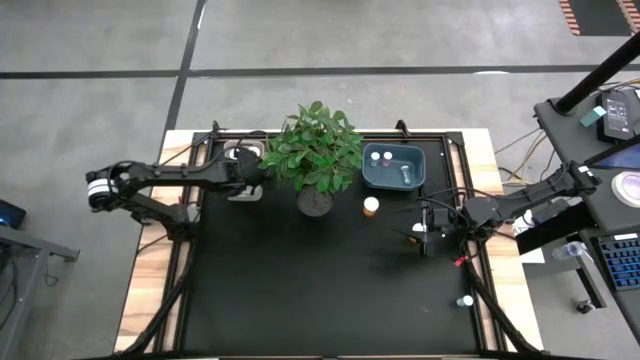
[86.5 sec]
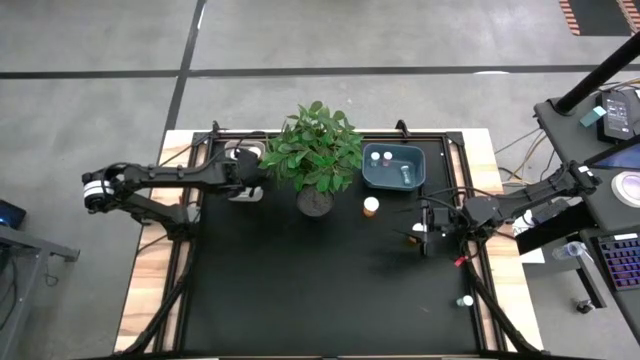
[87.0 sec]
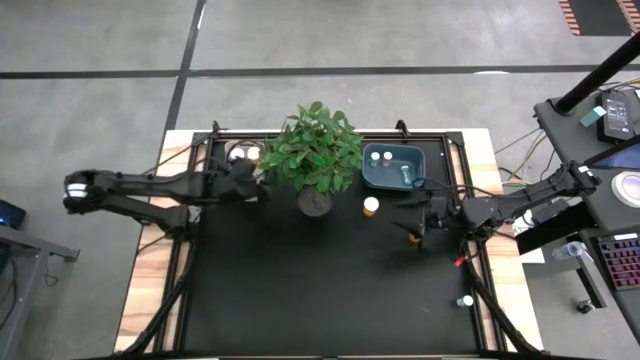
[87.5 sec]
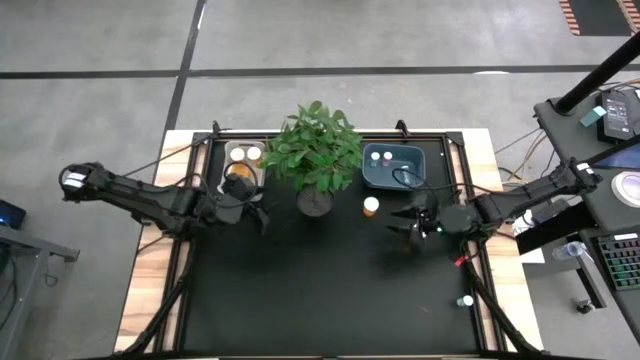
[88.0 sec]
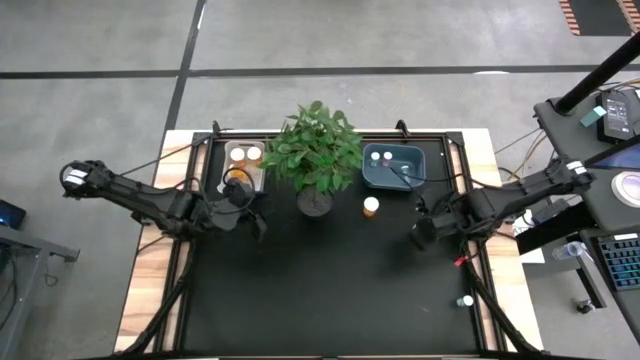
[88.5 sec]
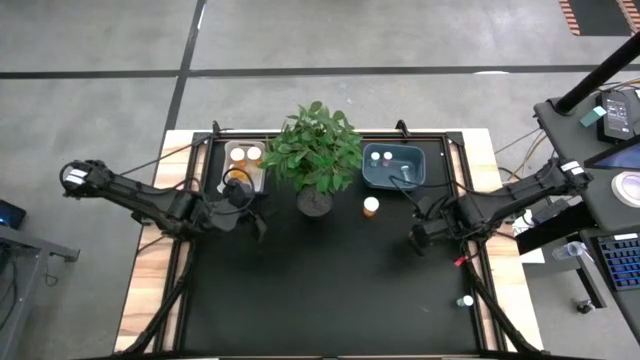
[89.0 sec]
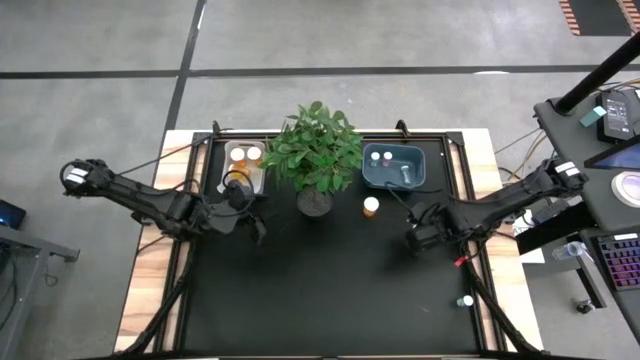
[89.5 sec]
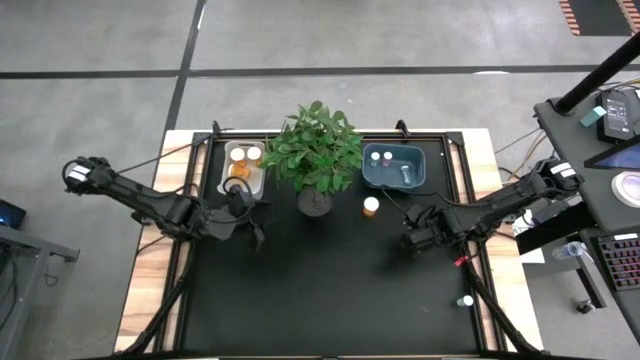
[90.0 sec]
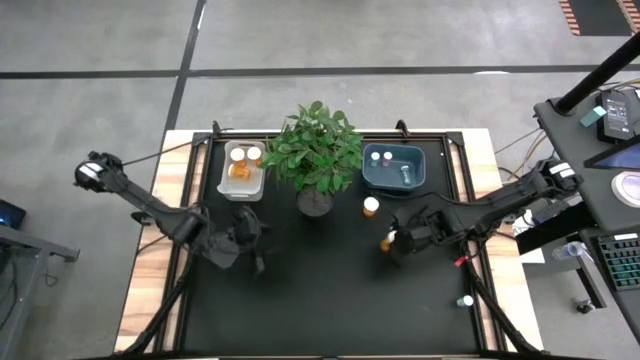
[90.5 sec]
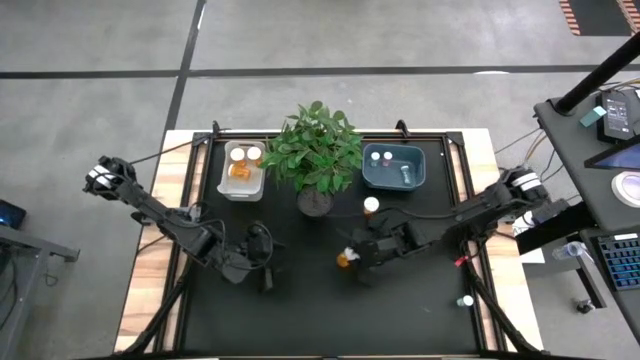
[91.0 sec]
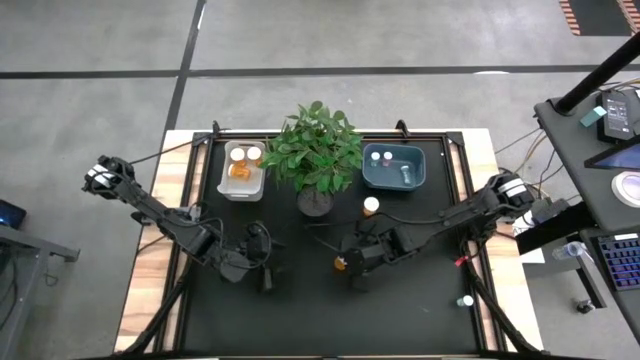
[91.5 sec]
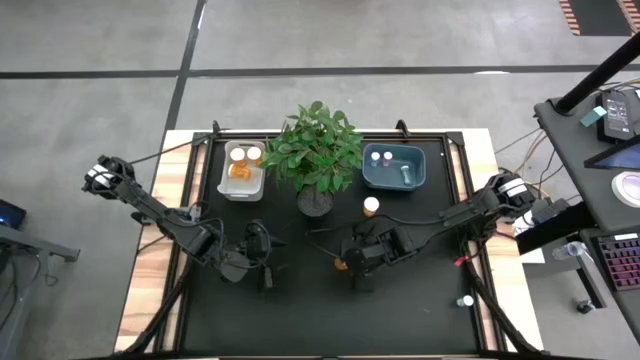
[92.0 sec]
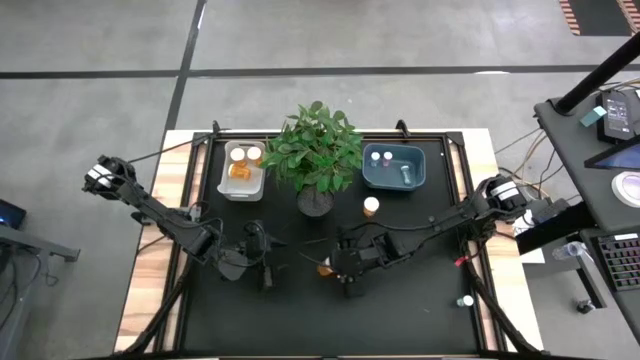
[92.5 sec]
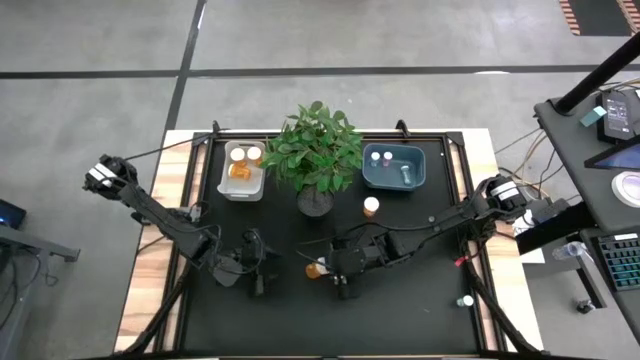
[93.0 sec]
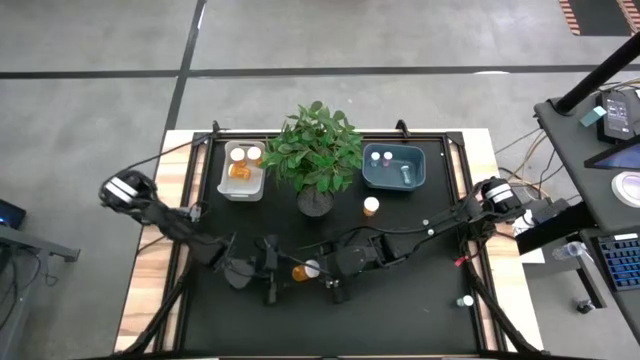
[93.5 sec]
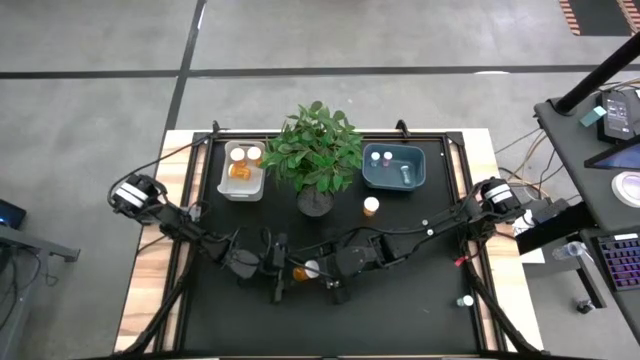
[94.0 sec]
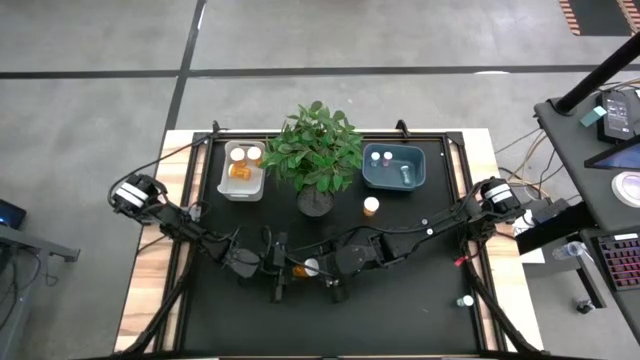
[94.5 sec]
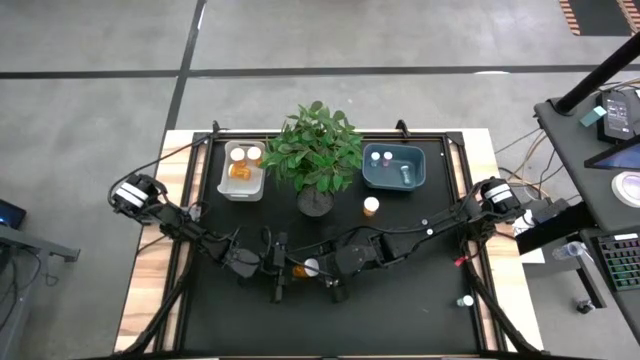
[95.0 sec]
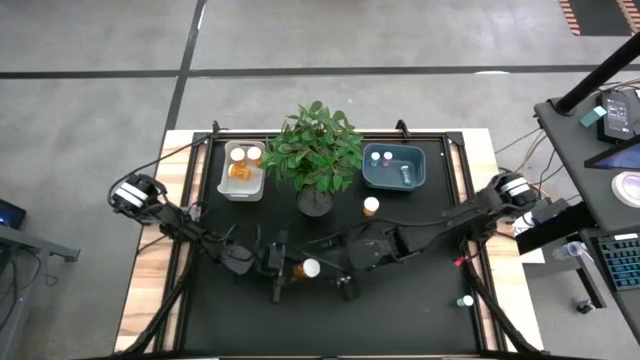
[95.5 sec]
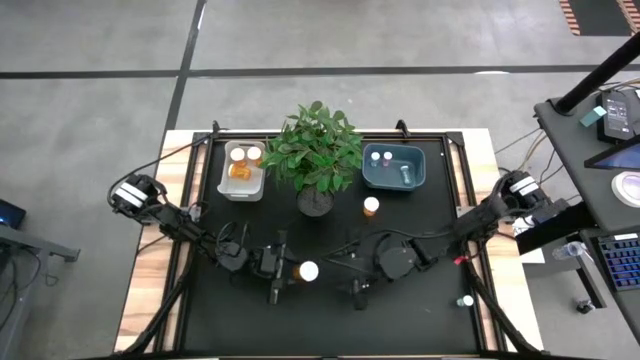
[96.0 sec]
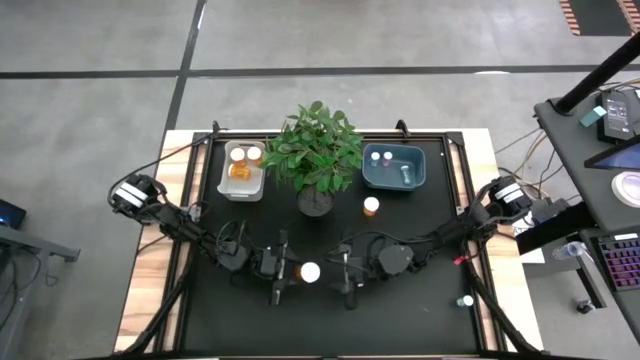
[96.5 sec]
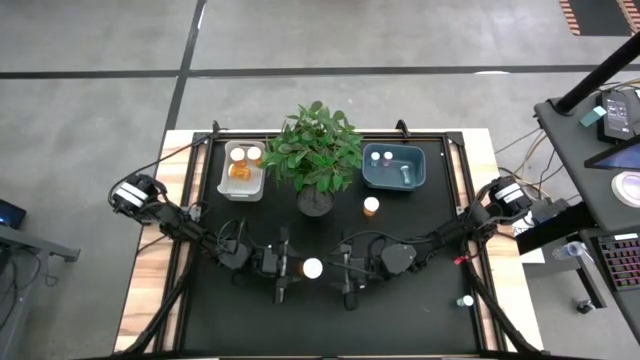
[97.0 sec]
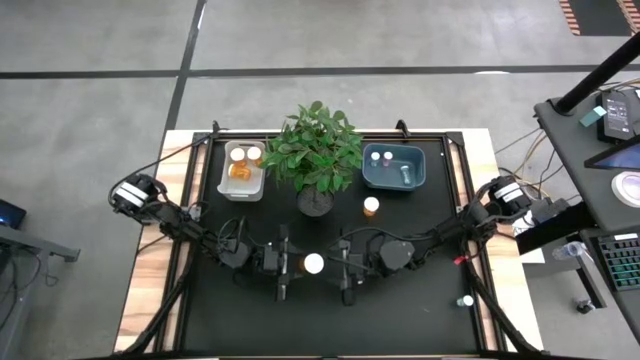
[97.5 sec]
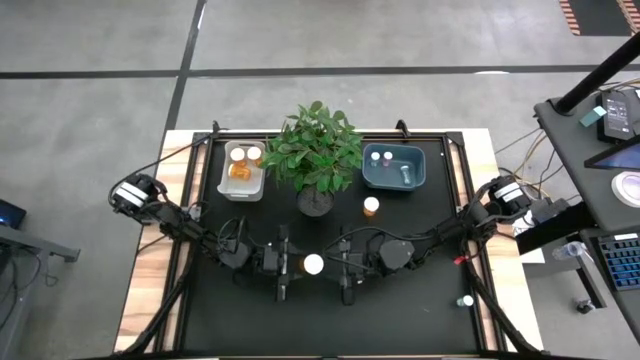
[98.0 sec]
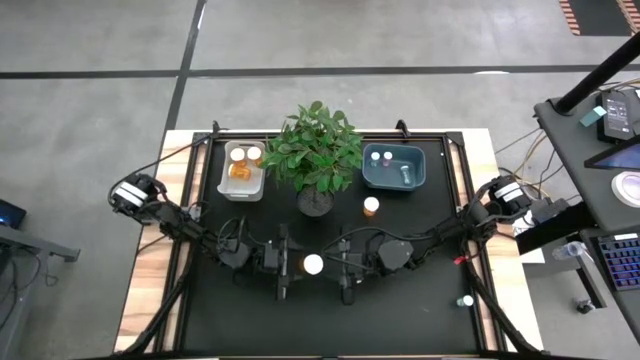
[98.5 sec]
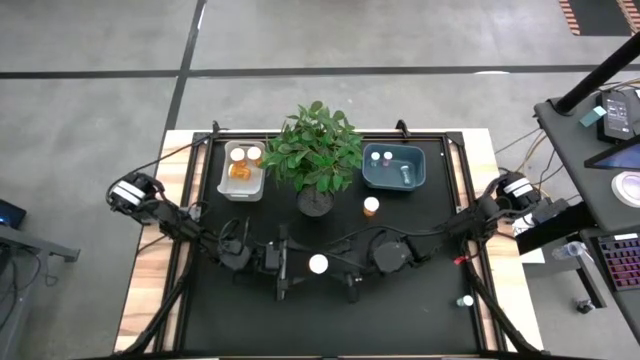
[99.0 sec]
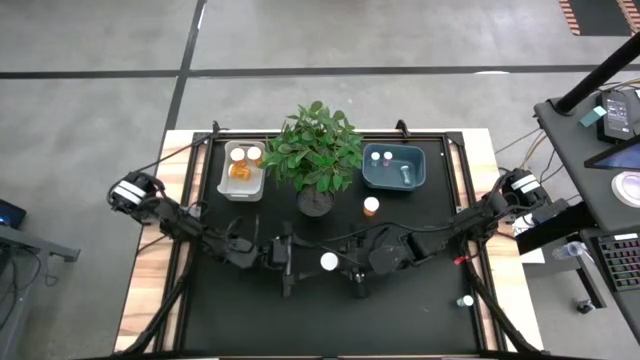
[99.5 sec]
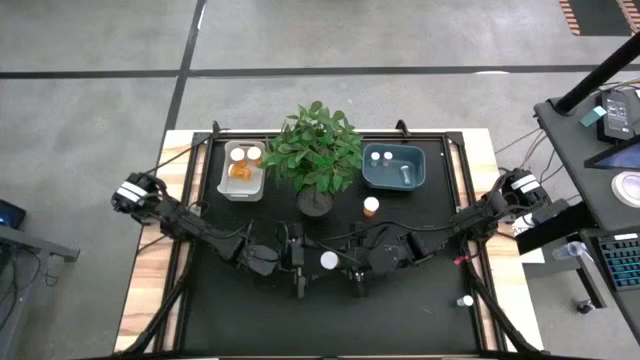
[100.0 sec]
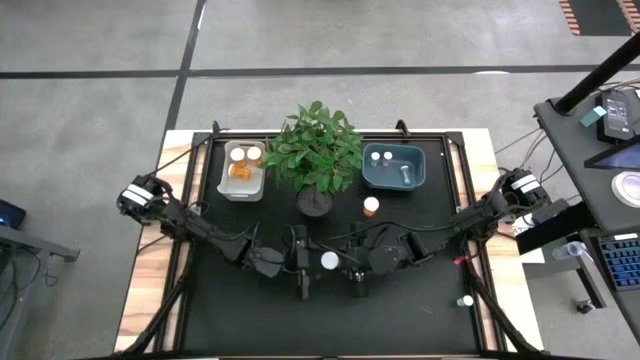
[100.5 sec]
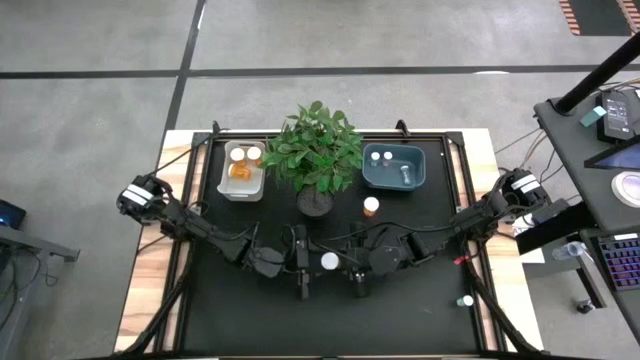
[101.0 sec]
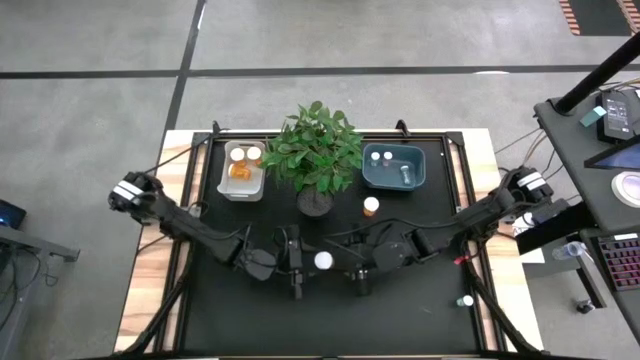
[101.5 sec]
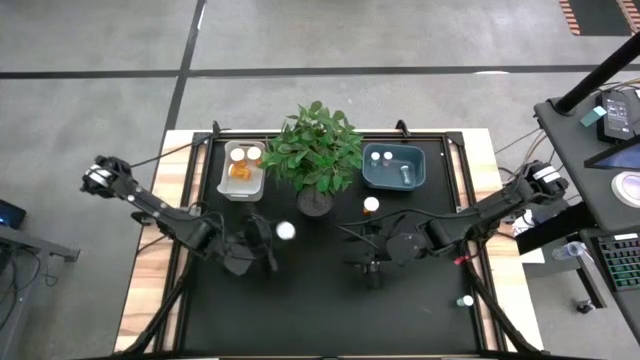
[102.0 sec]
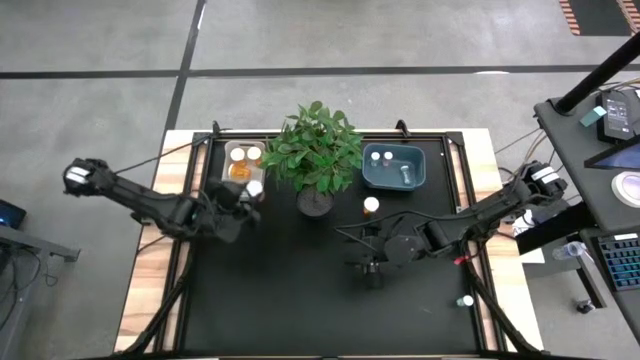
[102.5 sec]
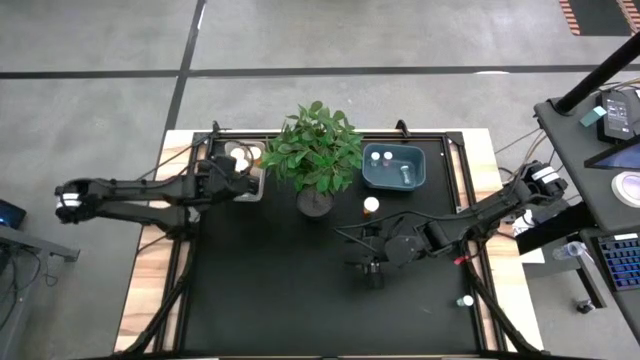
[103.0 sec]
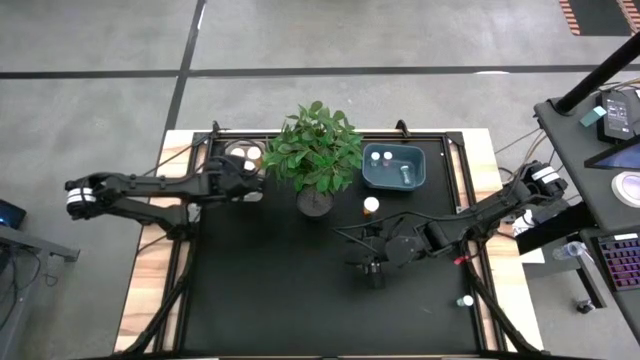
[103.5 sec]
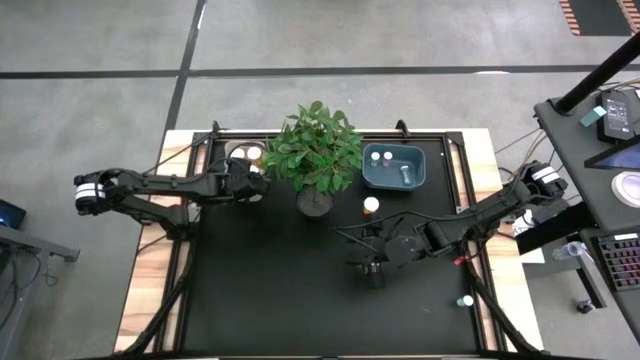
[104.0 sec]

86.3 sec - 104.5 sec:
Task: Pick and place medicine bottles into bin by pill shape (circle, oval)
Put the big orange pill bottle into the white bin

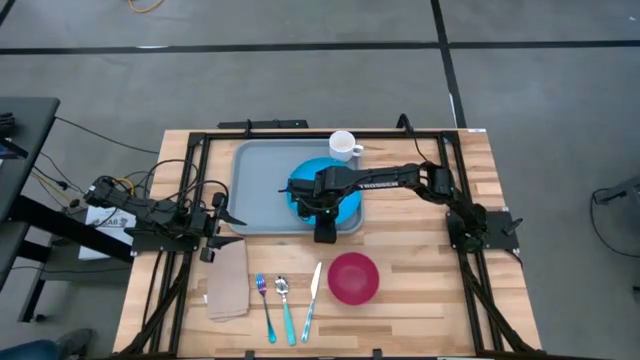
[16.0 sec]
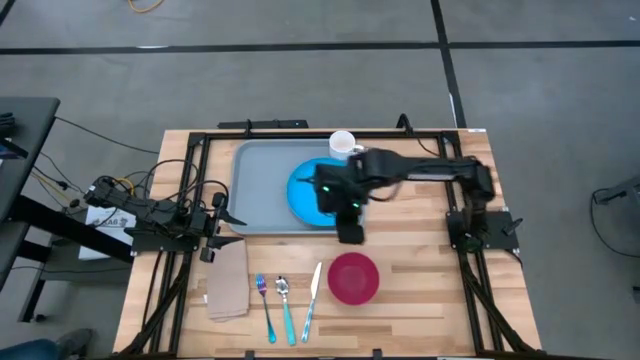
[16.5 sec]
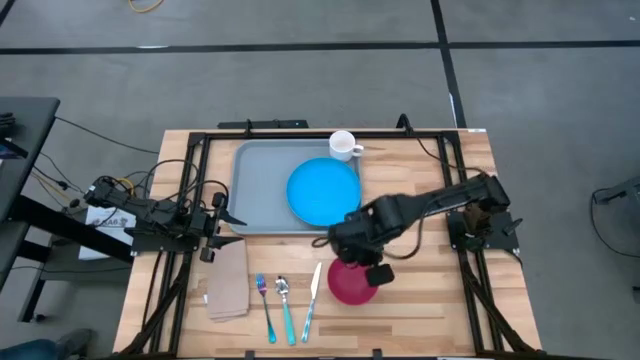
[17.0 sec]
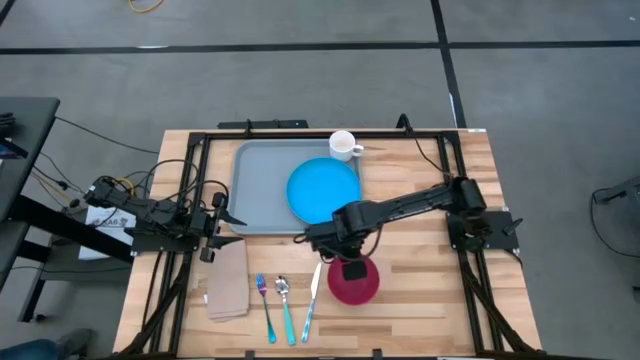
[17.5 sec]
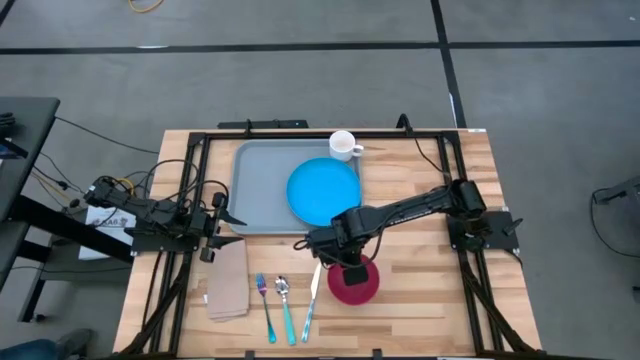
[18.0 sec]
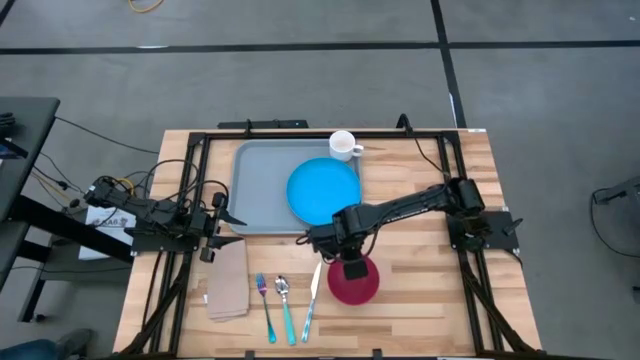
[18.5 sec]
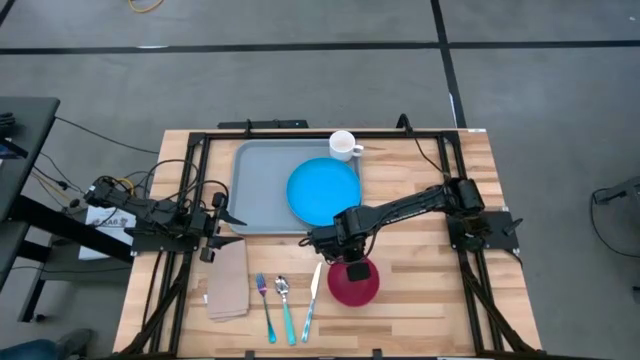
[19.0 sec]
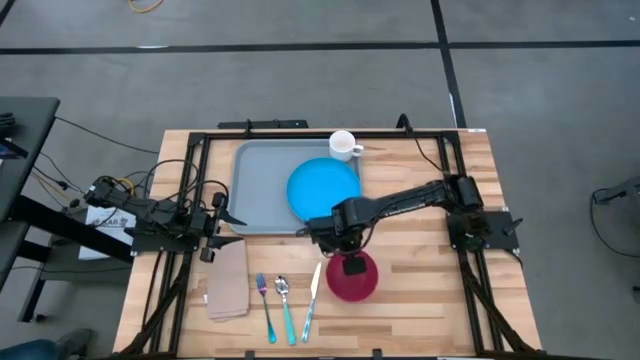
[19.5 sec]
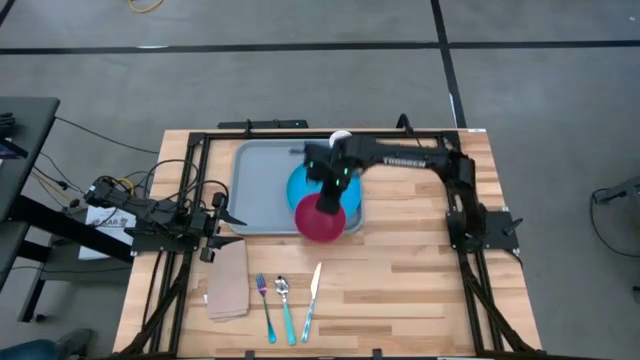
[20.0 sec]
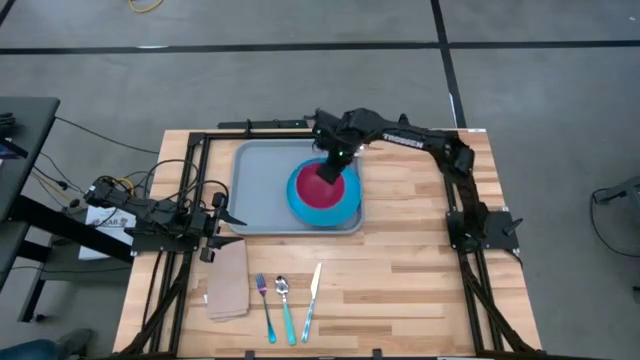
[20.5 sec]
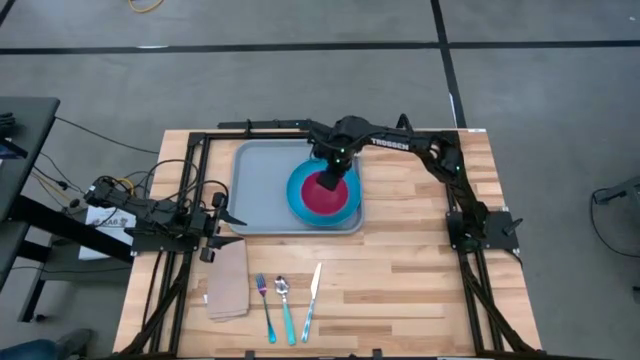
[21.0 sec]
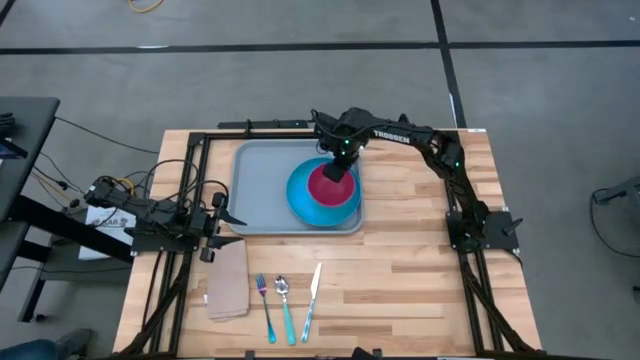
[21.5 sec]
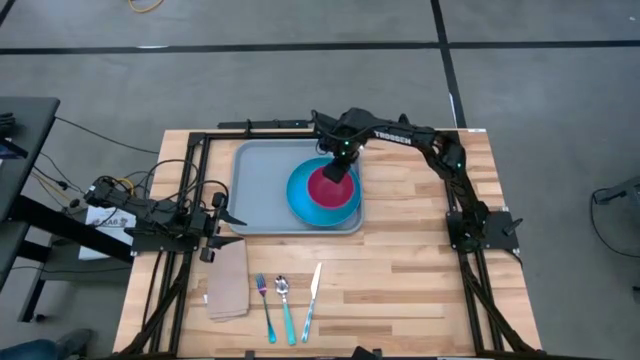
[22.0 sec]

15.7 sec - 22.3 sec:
Task: Set up tray
Put the pink bowl on the blue plate
